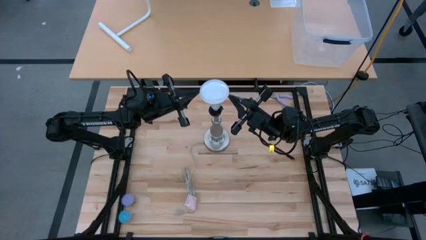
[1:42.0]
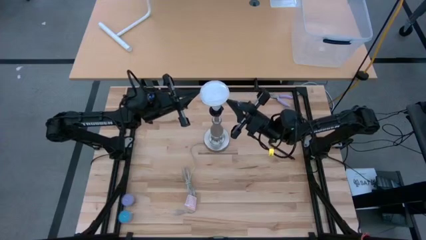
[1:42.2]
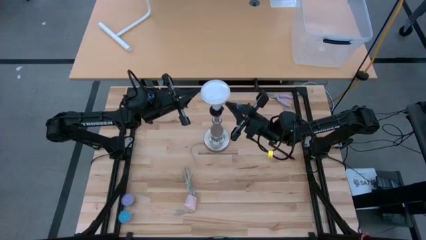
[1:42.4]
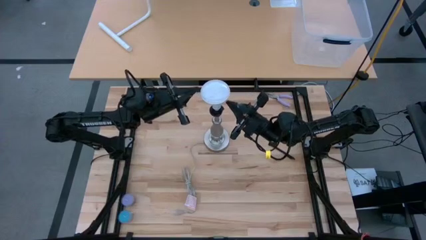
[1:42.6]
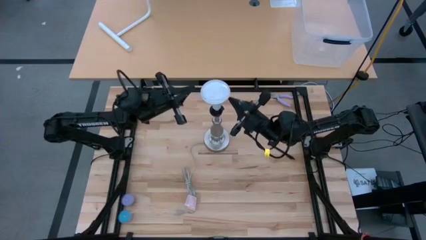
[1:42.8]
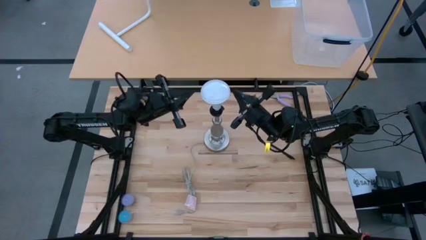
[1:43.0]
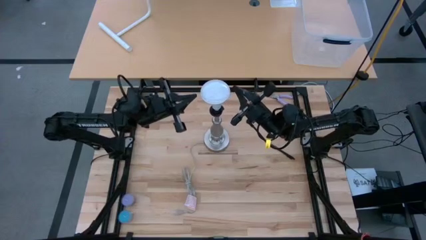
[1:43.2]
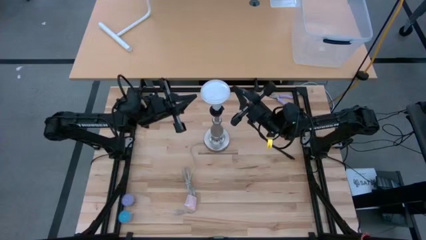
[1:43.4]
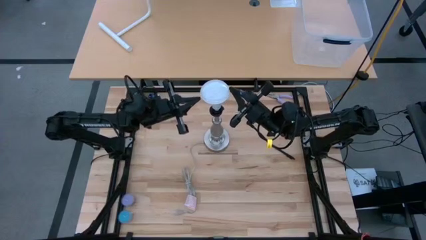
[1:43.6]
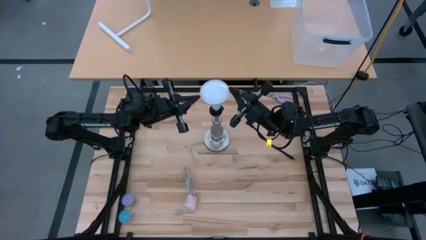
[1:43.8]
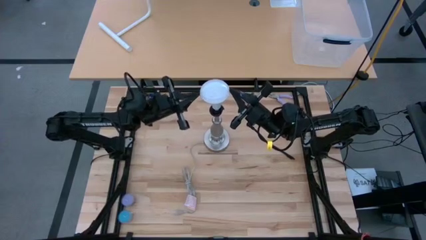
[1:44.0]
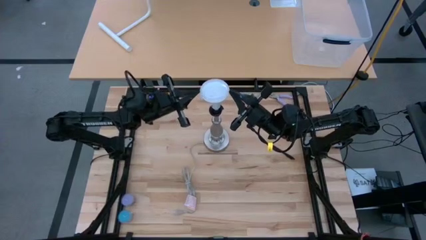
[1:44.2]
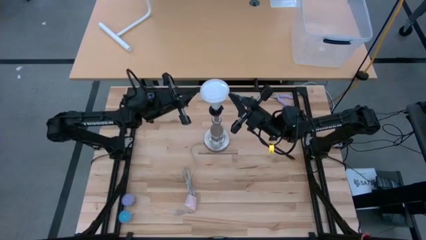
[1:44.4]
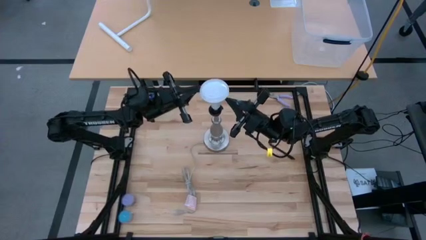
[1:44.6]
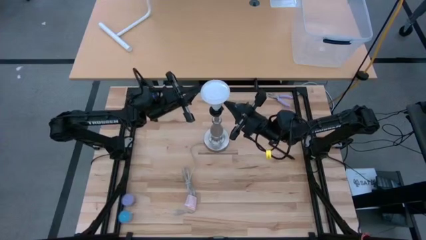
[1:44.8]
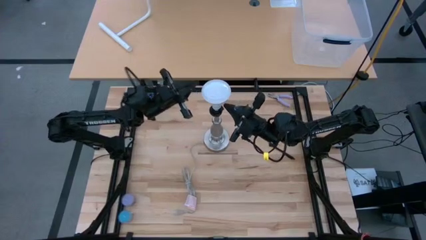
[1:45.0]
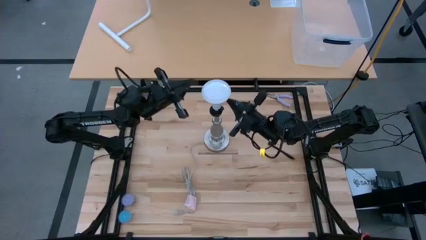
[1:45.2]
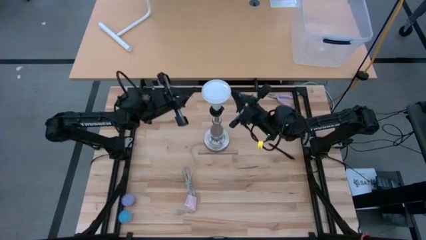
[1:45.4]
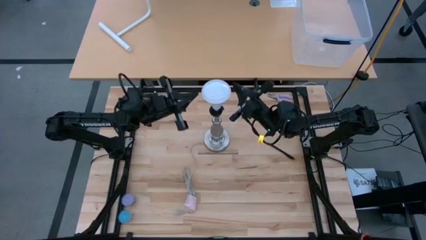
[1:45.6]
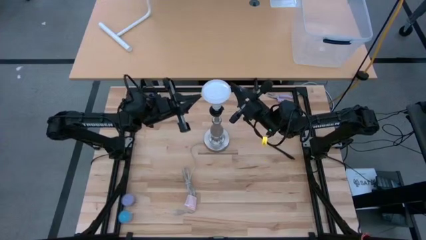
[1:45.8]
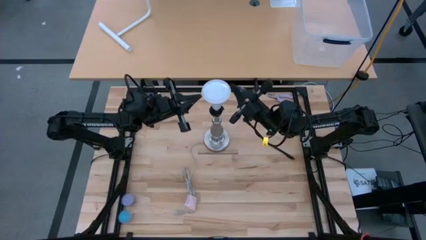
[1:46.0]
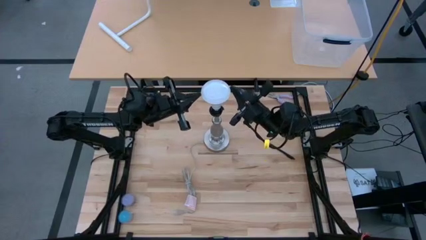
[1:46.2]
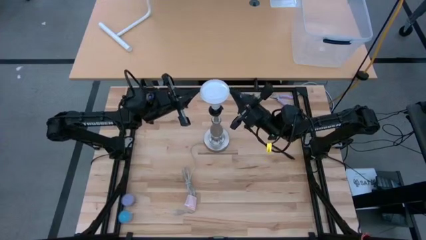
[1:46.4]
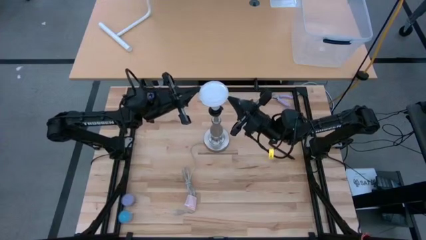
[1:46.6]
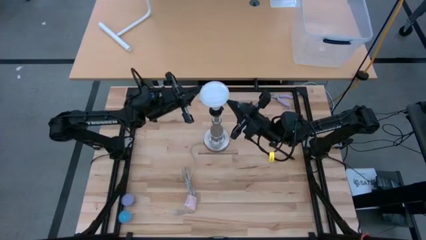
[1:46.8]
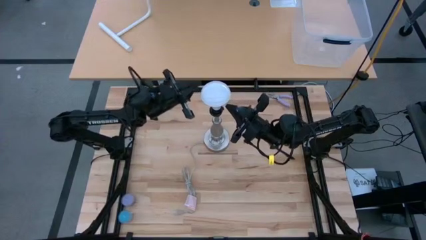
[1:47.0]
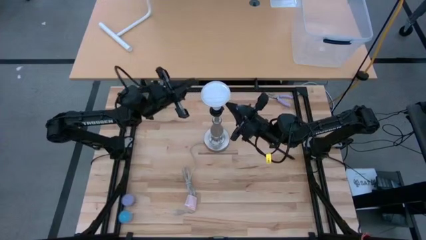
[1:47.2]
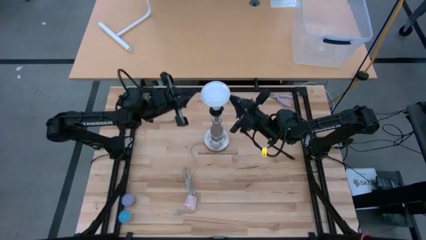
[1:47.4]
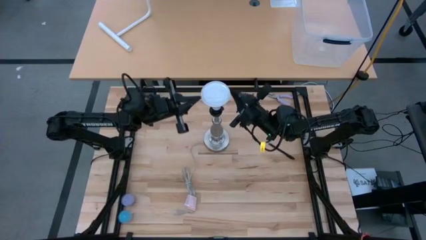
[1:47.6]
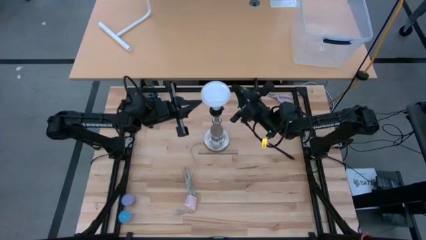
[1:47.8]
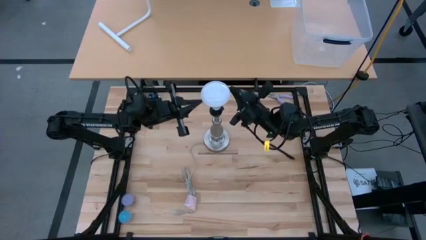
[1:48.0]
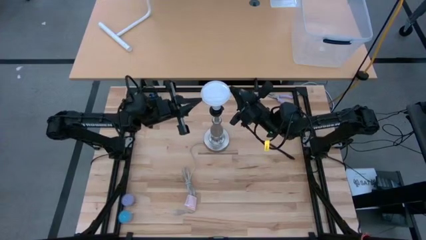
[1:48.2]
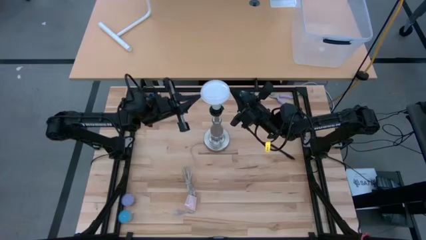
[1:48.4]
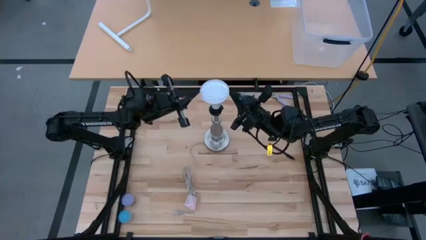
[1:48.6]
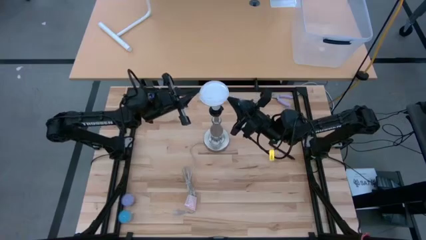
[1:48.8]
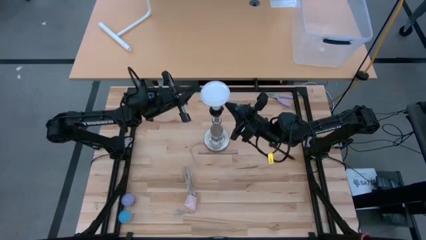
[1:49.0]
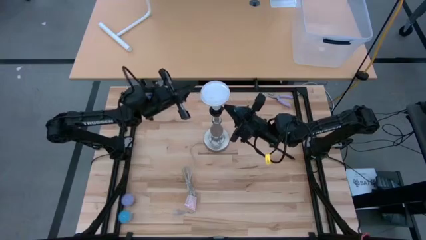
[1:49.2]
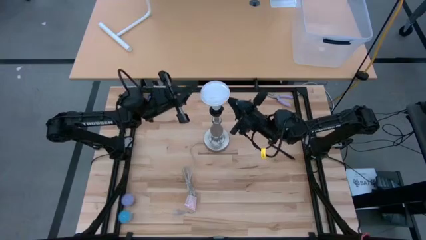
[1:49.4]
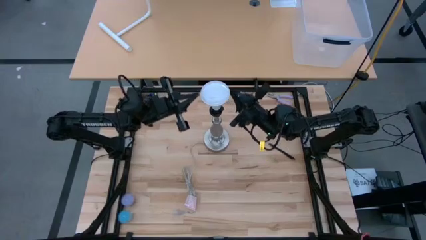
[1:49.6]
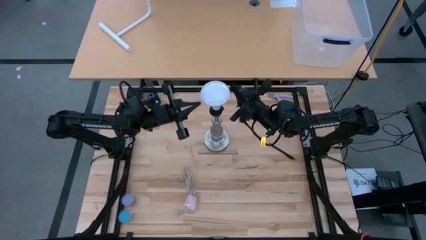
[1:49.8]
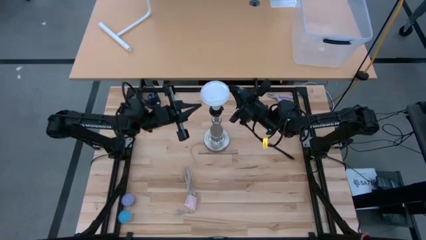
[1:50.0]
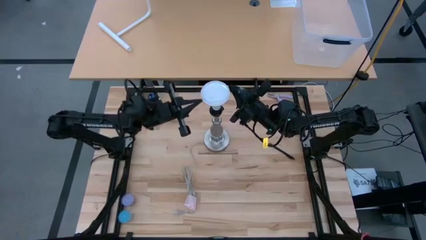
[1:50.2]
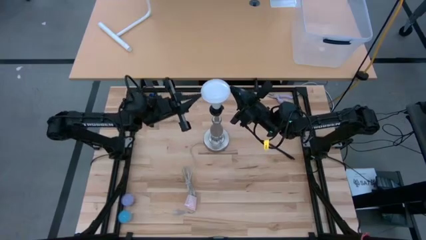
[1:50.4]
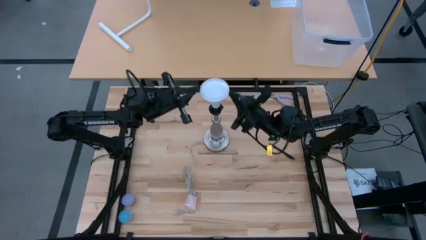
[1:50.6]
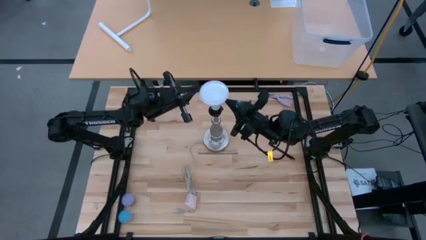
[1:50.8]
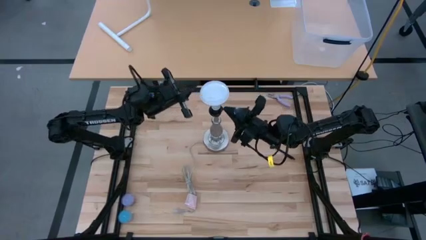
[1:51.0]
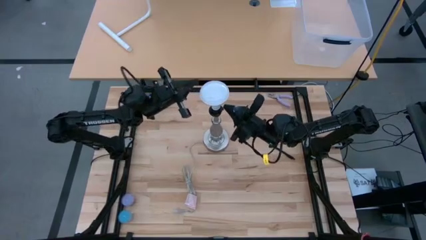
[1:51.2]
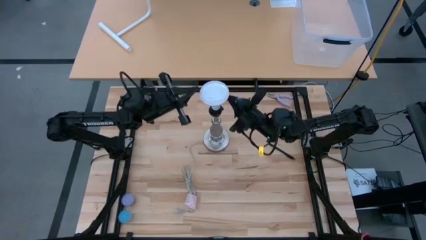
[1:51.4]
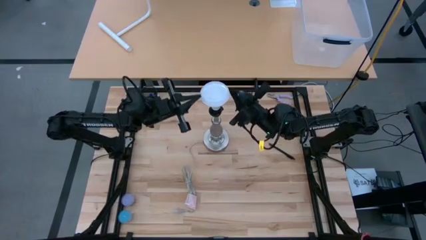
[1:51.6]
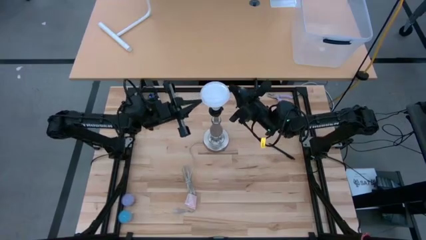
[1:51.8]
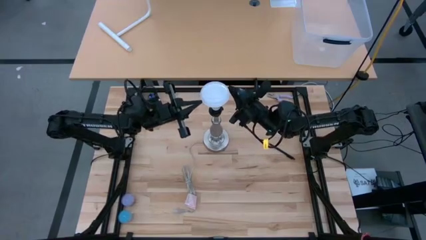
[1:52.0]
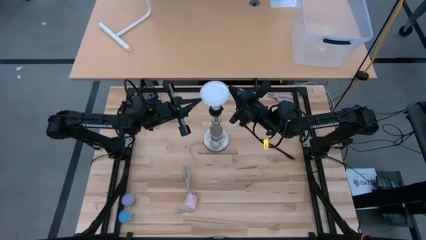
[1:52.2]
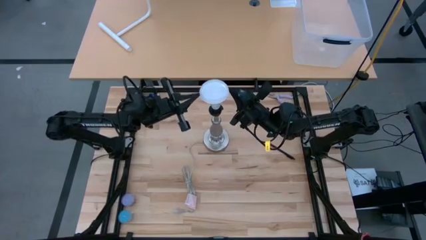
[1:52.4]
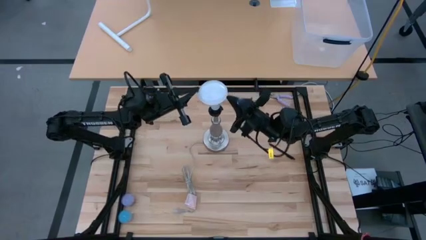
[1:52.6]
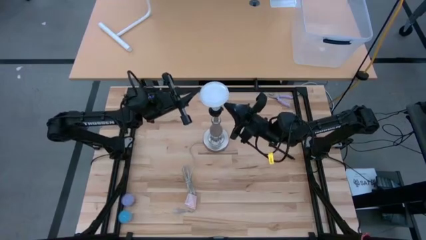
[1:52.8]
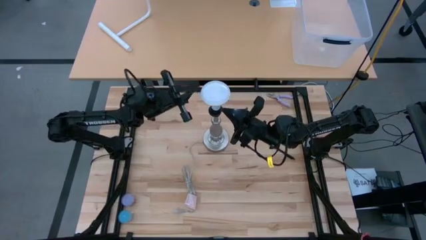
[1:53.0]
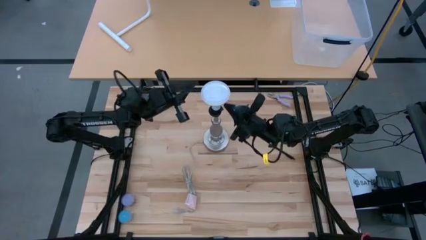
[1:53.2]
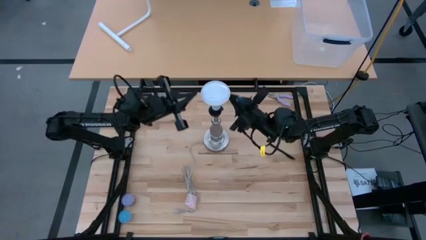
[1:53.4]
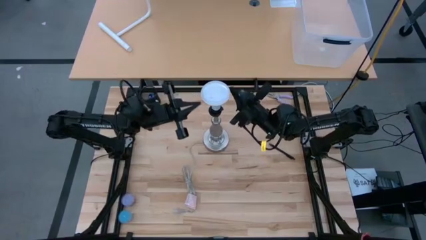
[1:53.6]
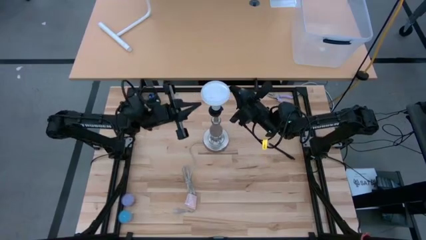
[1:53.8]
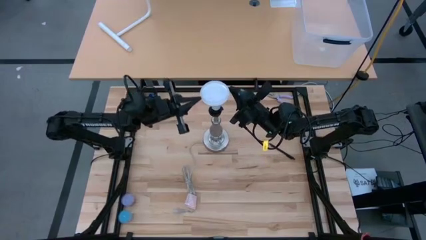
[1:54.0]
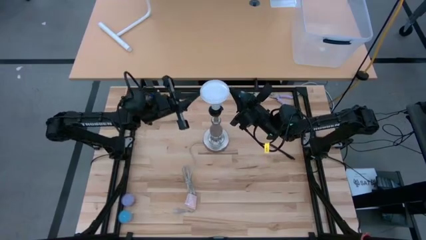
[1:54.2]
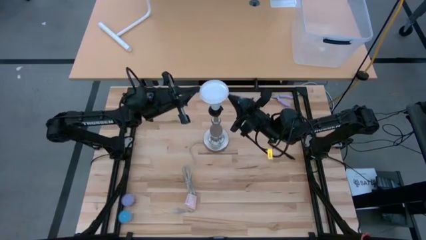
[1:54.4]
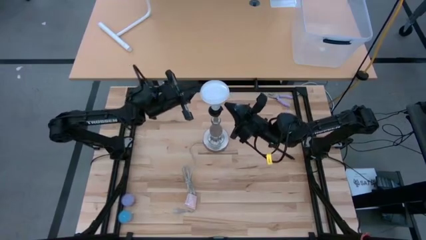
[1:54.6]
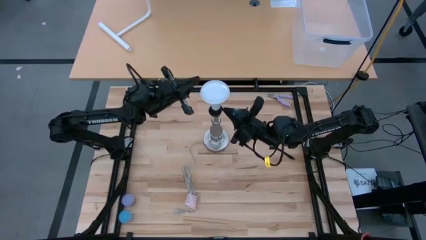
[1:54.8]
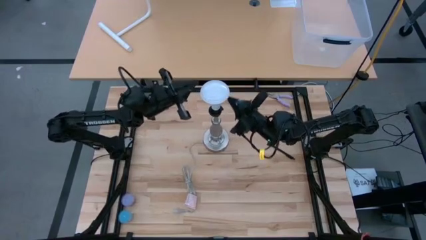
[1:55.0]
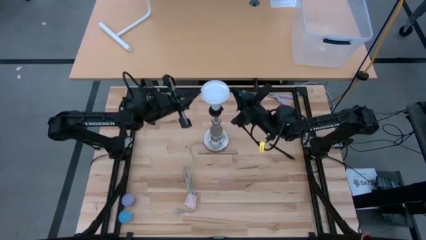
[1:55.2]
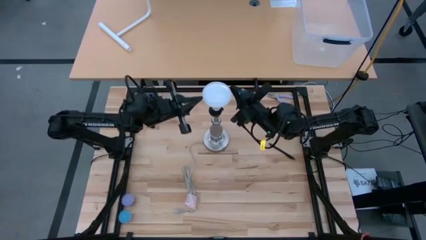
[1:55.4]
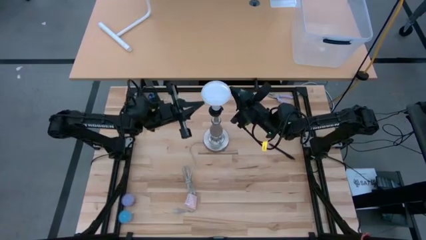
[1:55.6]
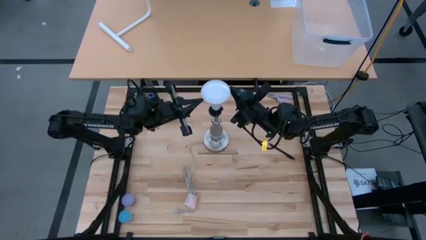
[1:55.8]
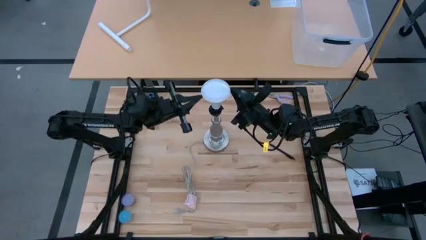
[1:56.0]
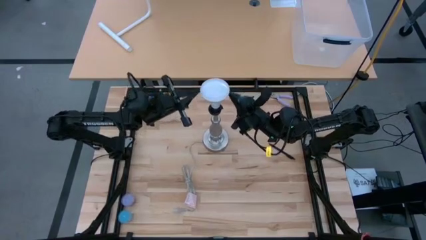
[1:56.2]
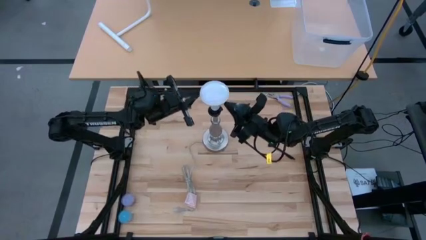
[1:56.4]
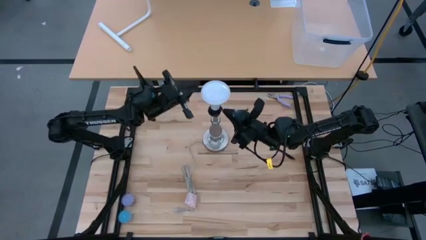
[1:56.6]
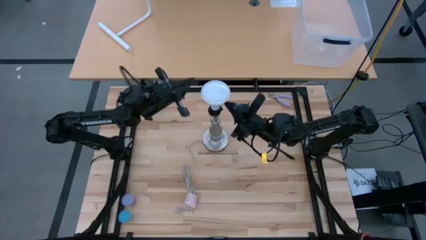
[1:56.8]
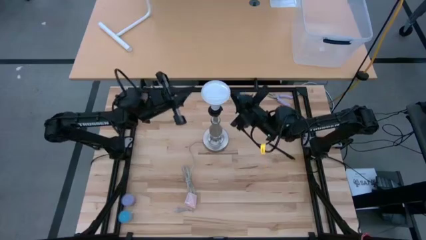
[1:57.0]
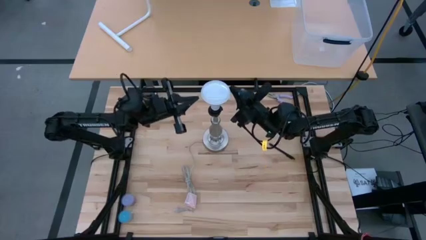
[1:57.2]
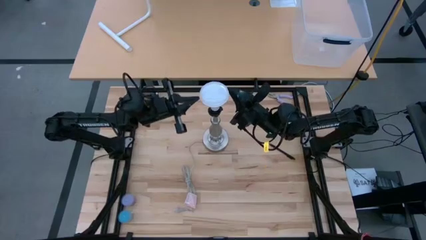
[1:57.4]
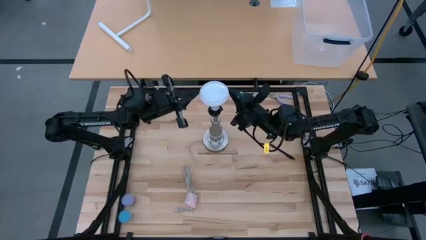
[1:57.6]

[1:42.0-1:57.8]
Task: Screw lightbulb
Insert the lightbulb into the lamp
